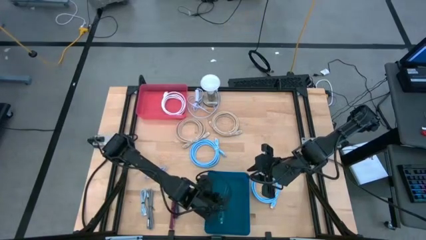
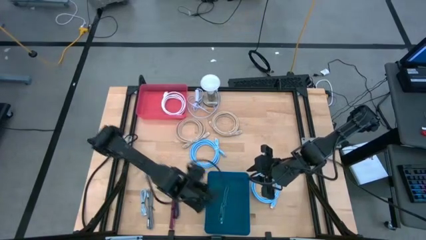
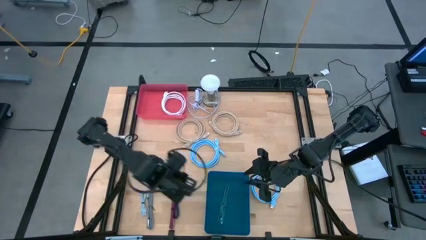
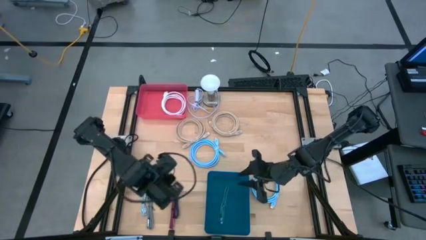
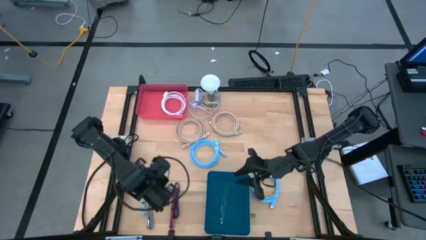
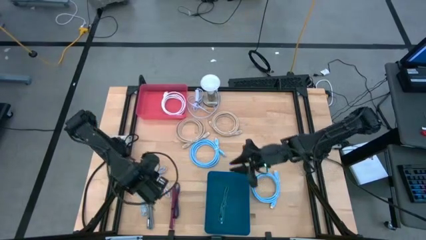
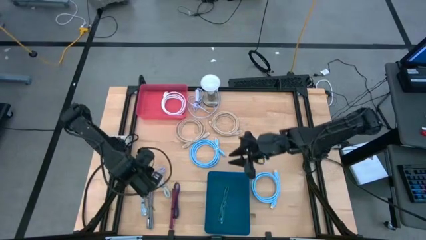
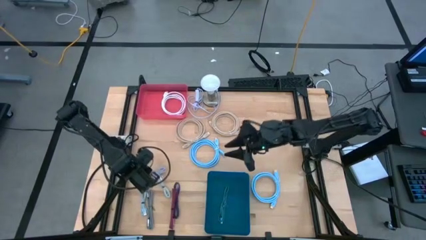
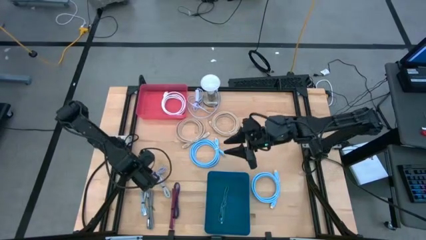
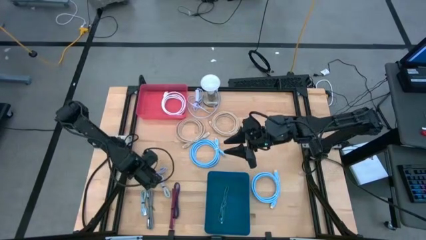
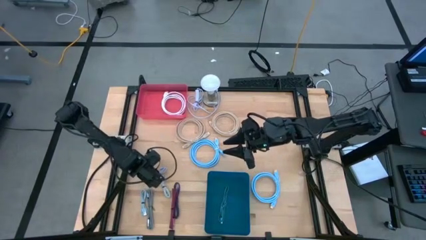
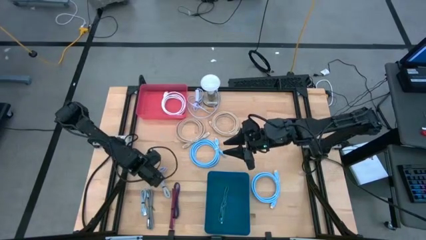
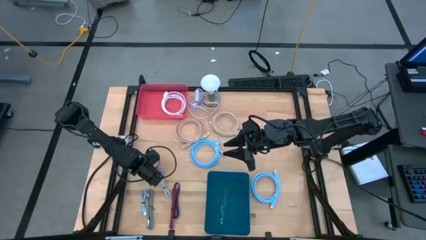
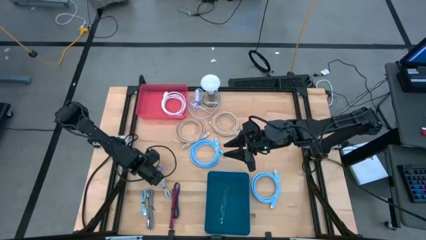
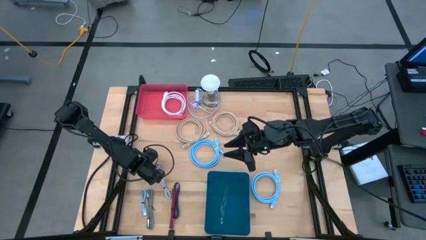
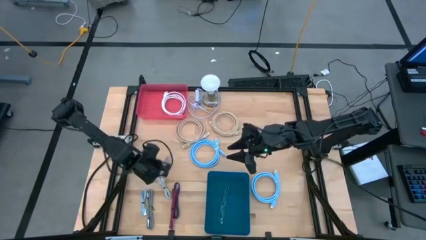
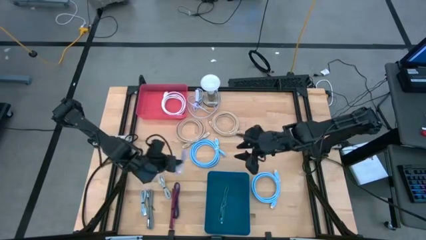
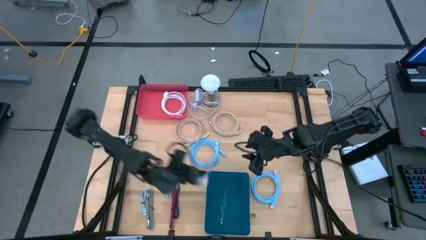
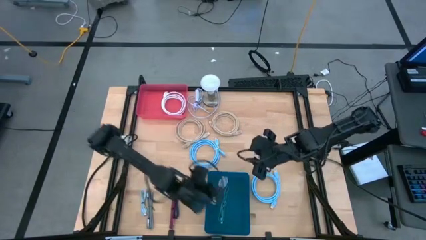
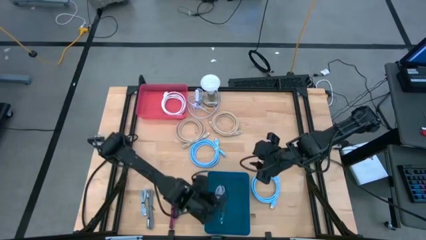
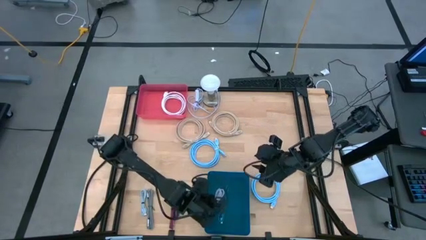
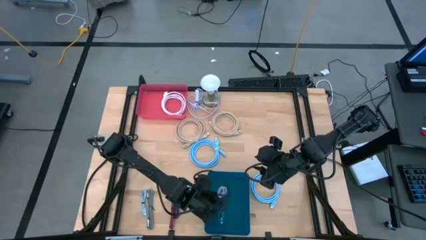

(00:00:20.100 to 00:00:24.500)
Task: Pick & Place USB Port
Put the purple USB cable into the blue bin

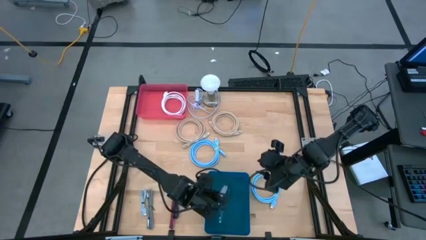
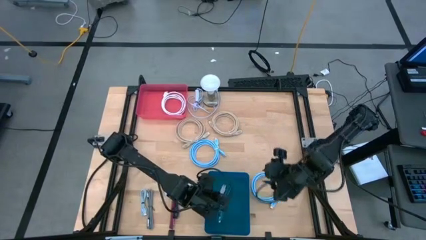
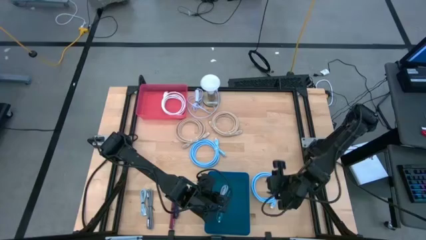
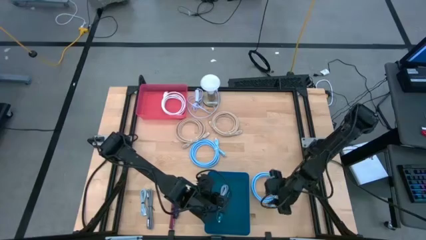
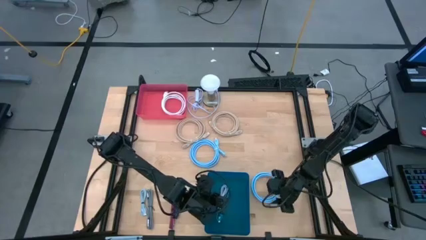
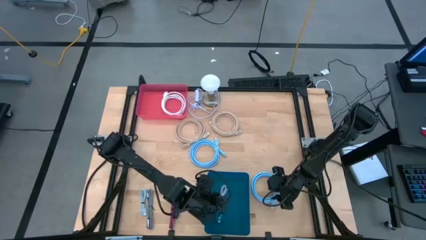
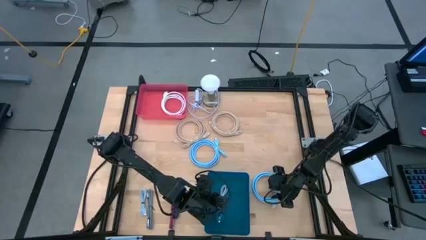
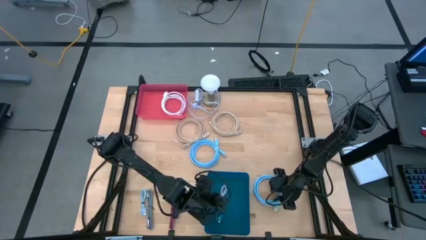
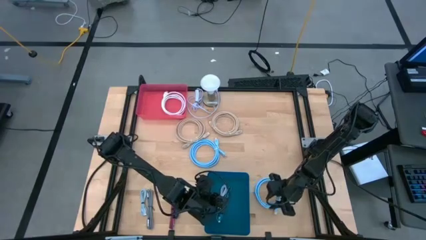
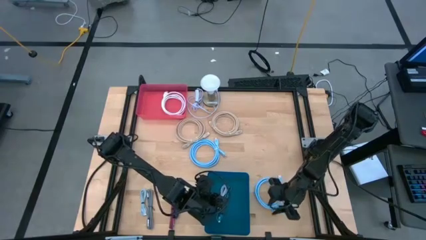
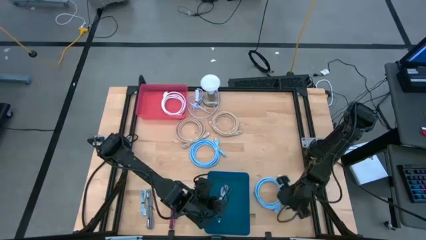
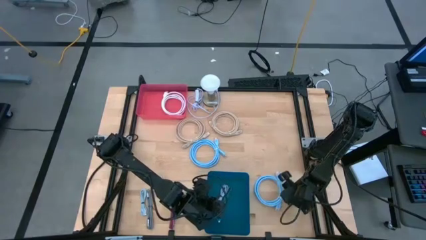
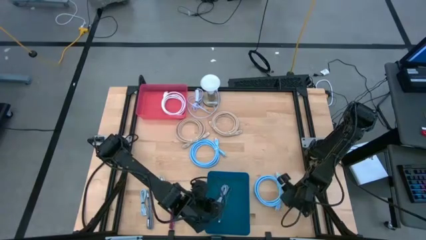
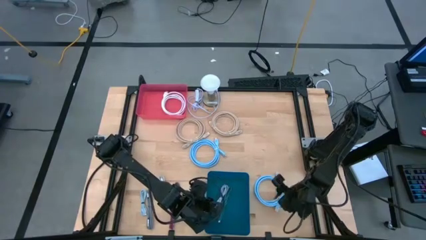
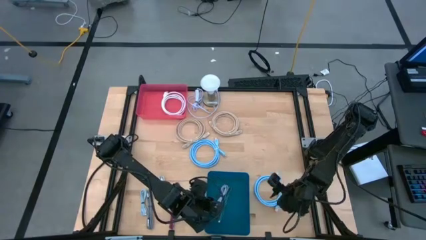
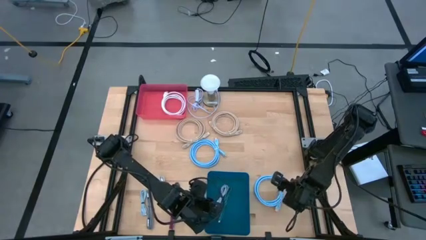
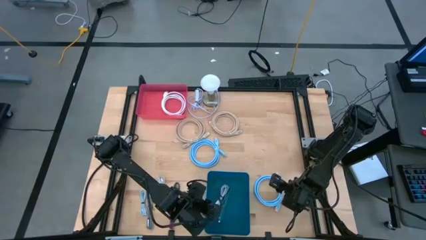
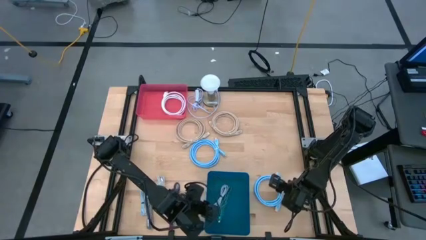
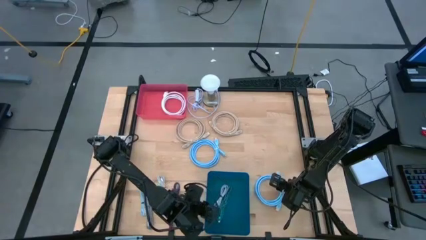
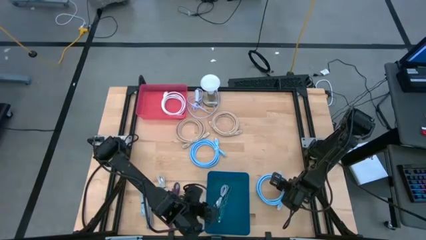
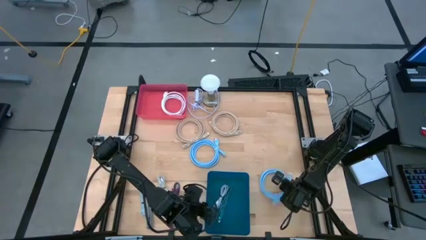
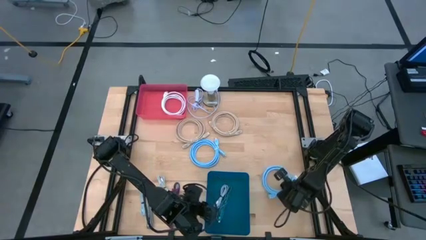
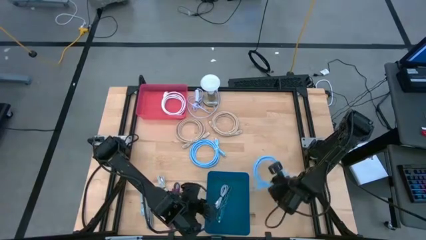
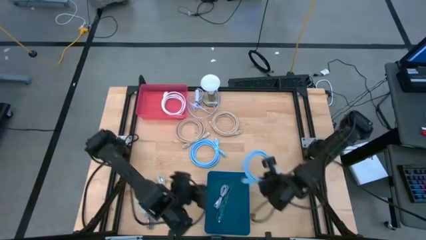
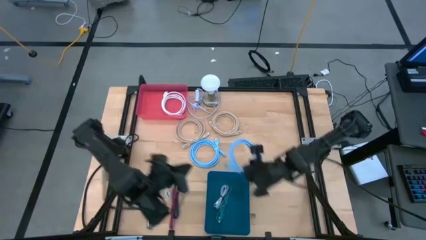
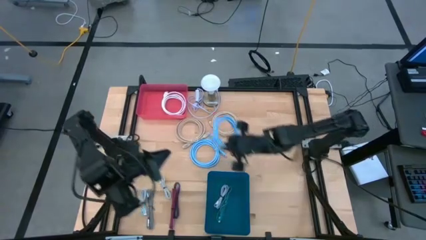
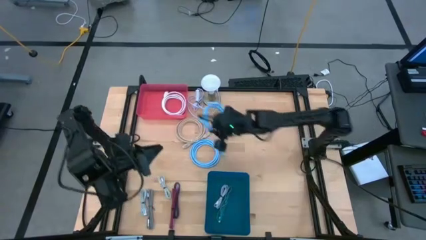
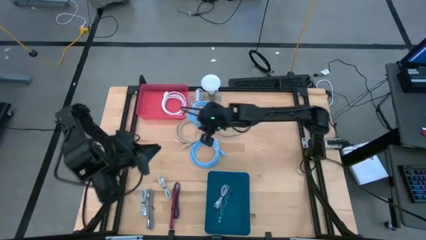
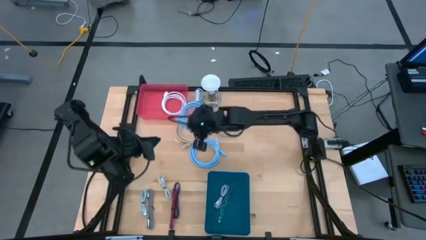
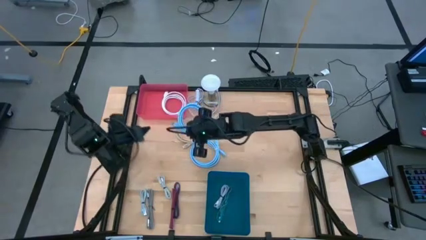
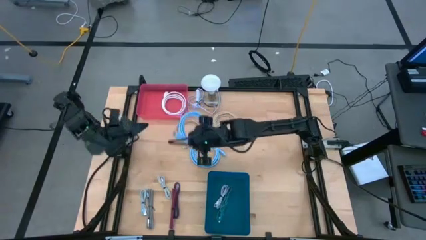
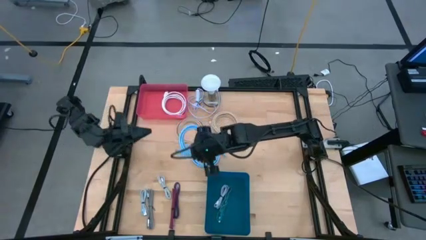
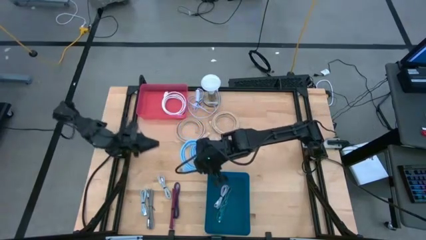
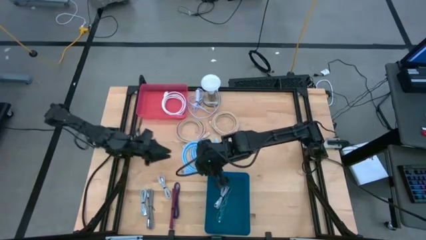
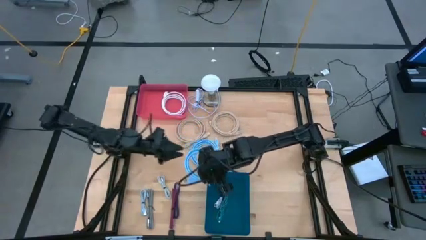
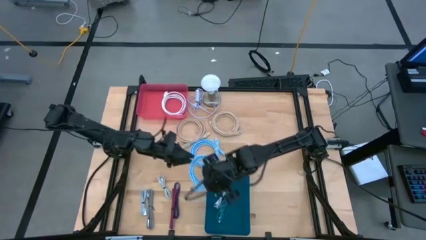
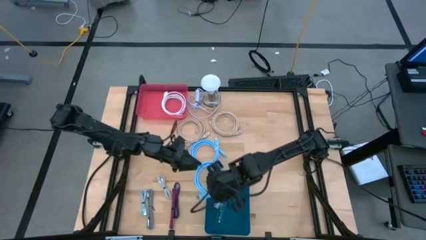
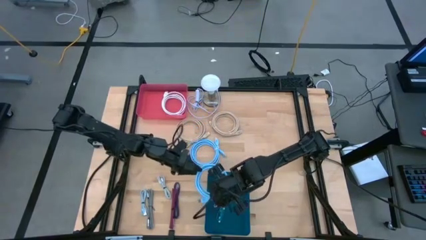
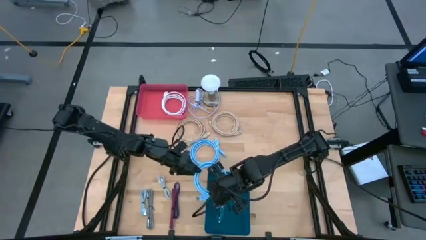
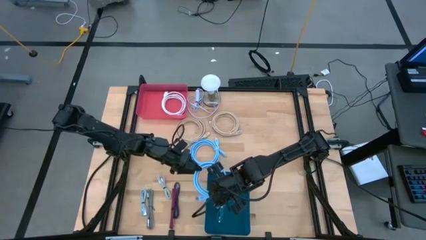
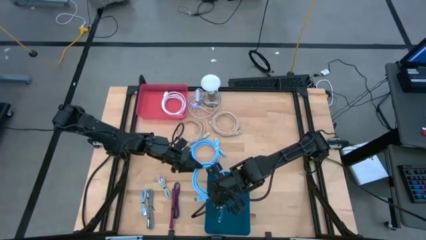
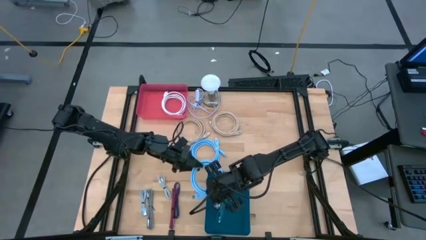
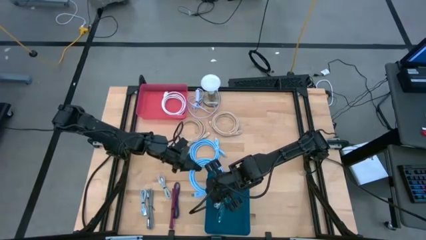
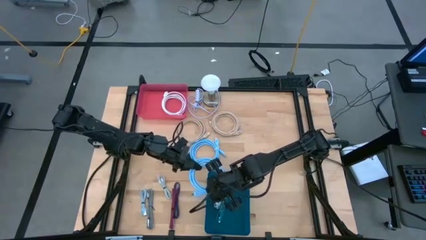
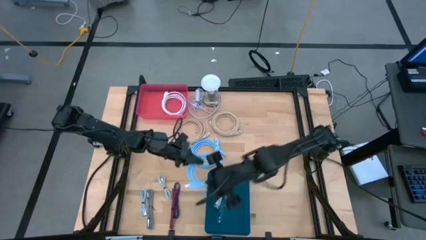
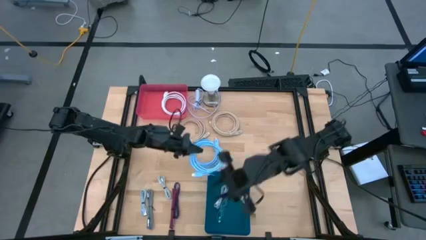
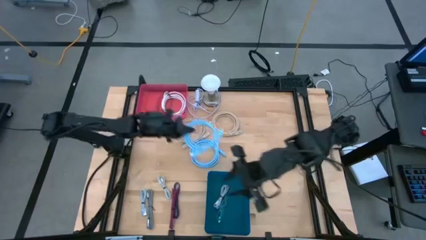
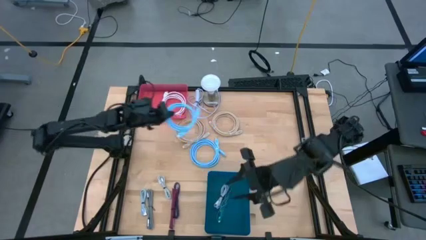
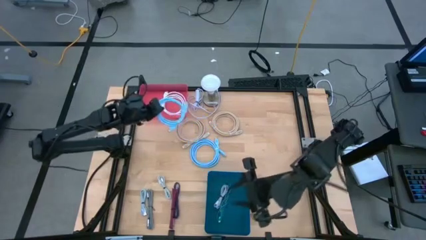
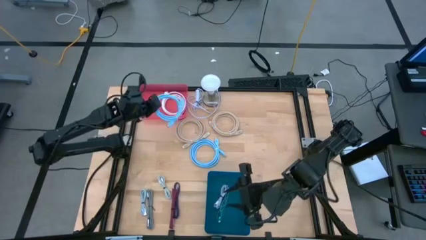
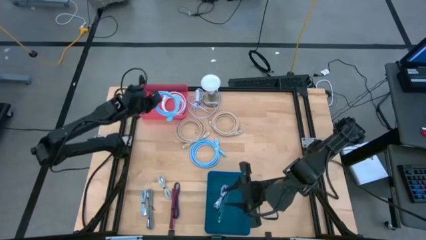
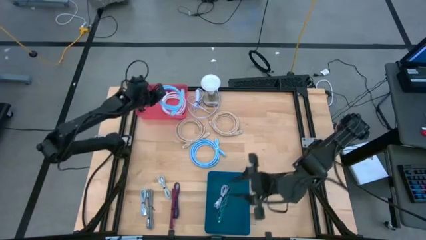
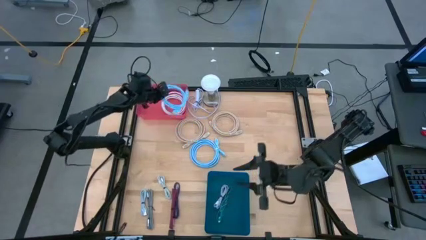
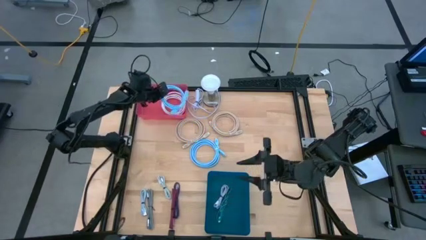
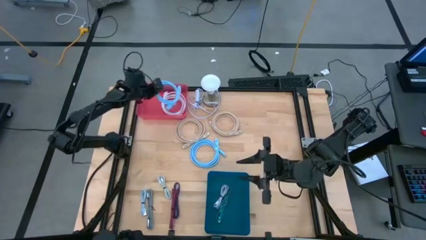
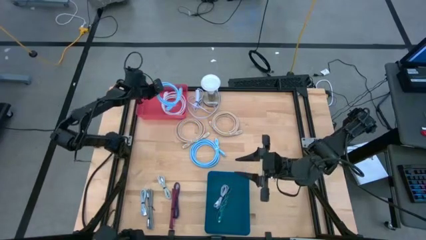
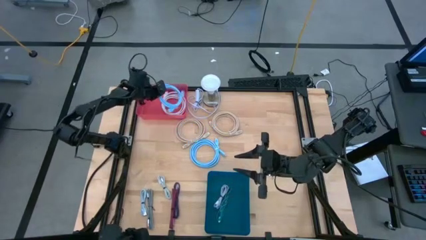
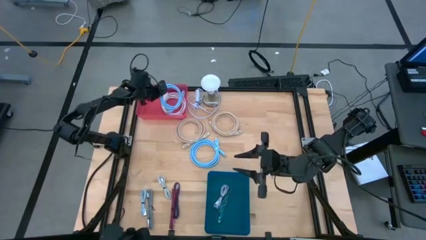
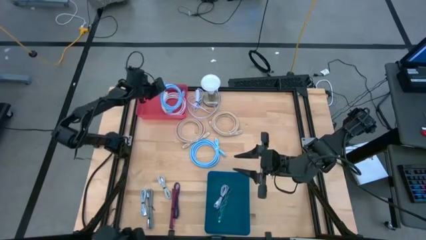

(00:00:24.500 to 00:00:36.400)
Put the bottom blue HDMI cable into the red bin
